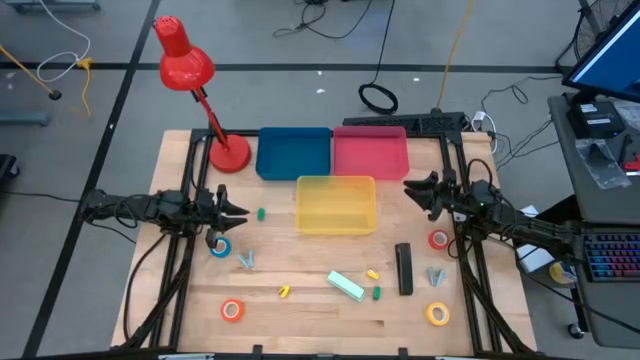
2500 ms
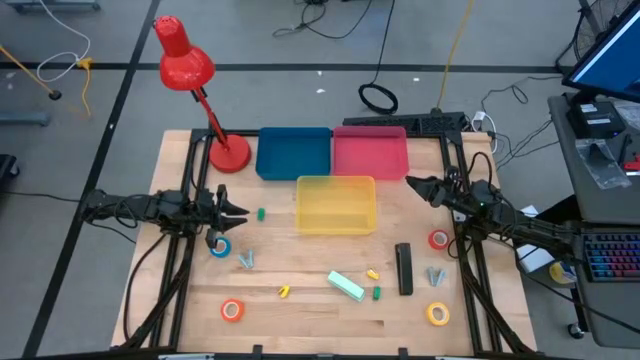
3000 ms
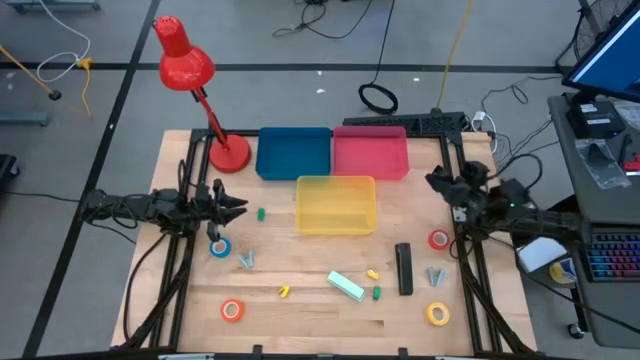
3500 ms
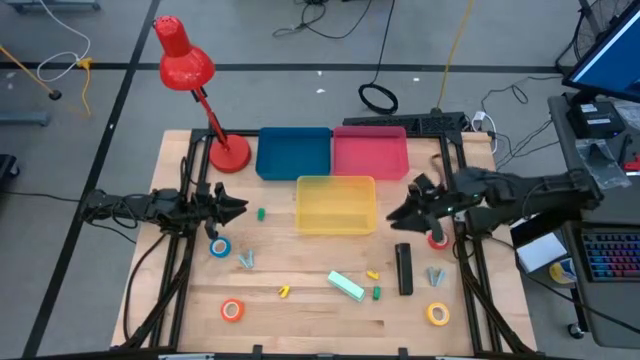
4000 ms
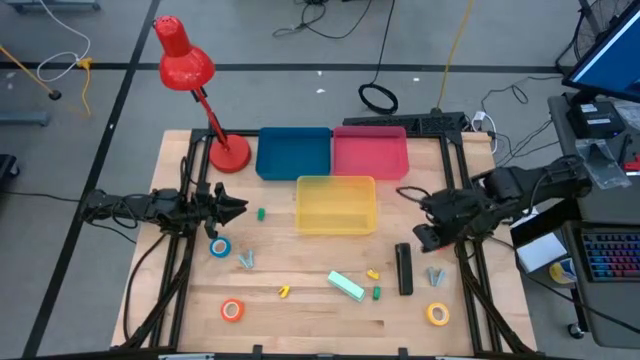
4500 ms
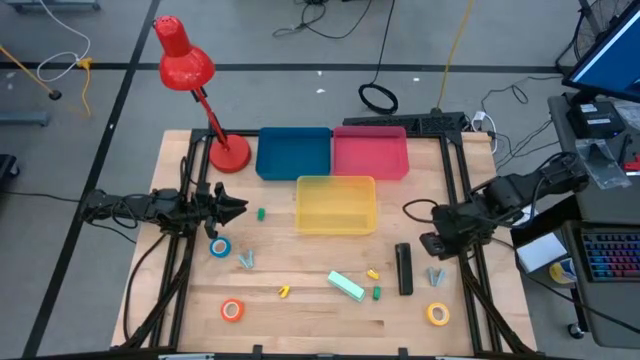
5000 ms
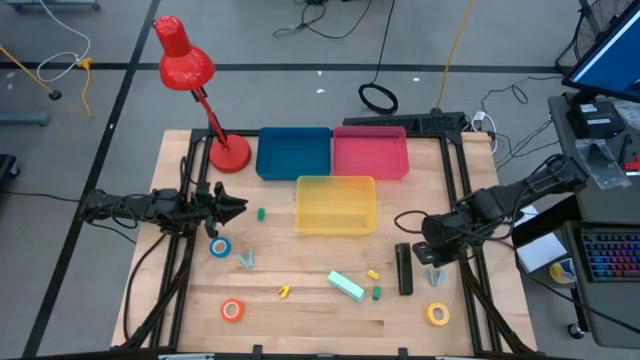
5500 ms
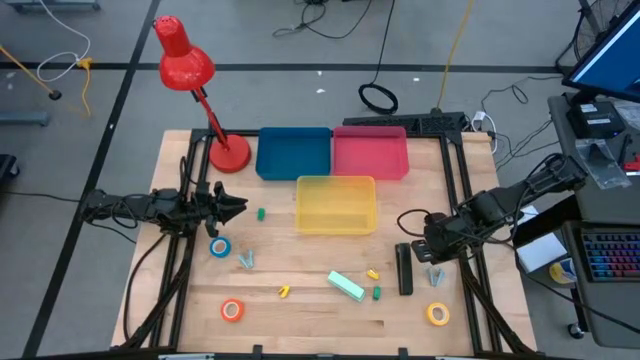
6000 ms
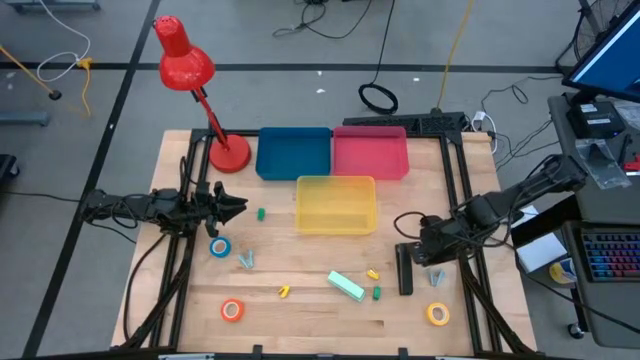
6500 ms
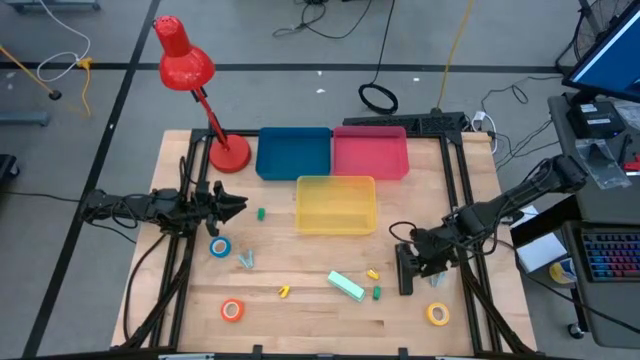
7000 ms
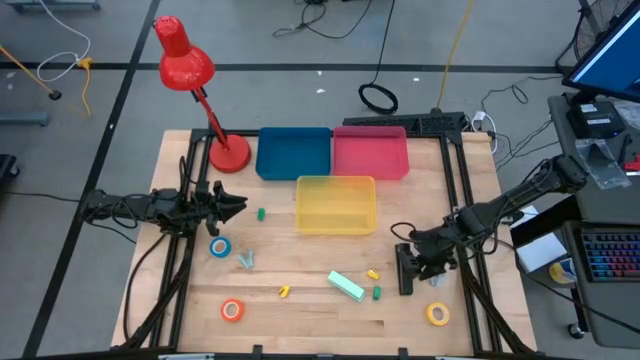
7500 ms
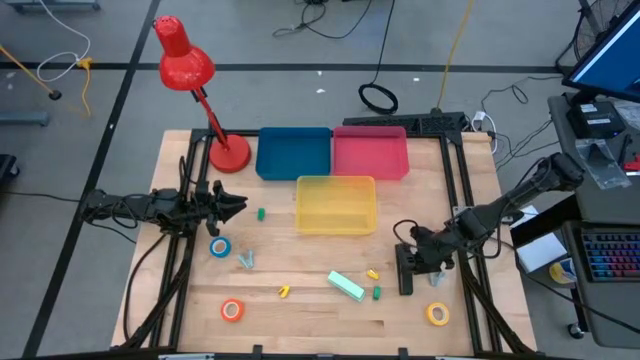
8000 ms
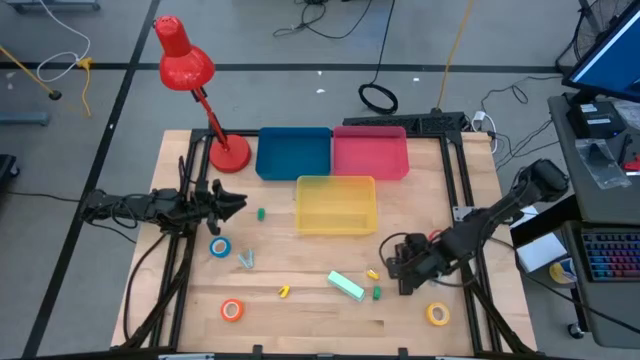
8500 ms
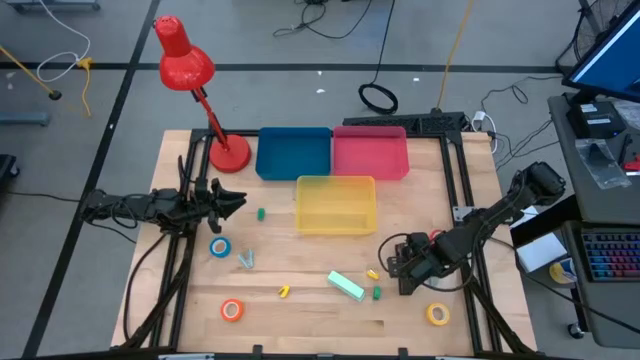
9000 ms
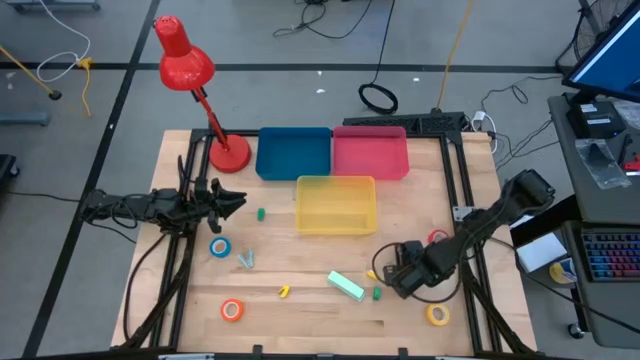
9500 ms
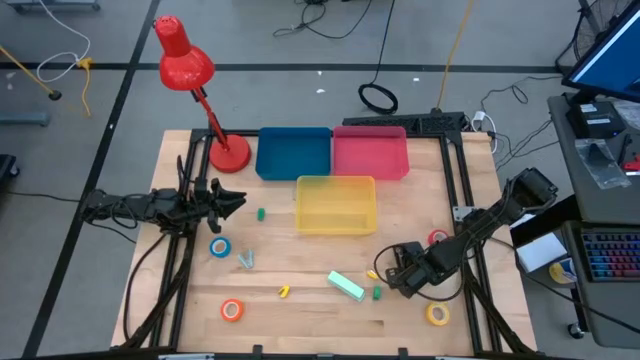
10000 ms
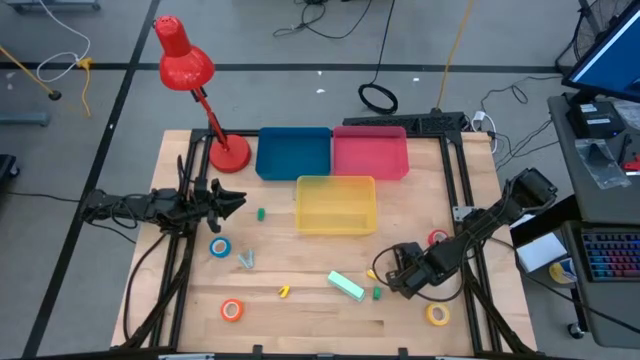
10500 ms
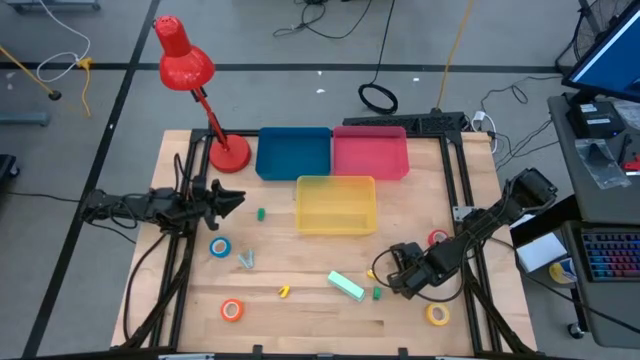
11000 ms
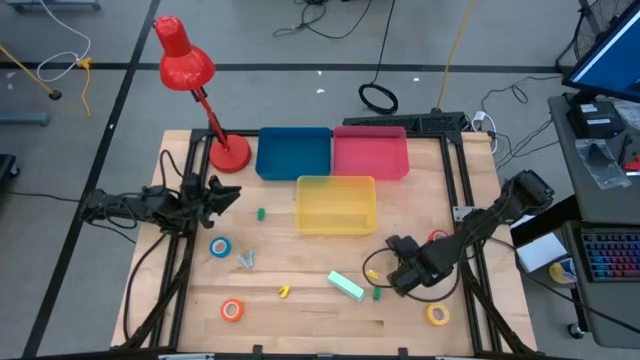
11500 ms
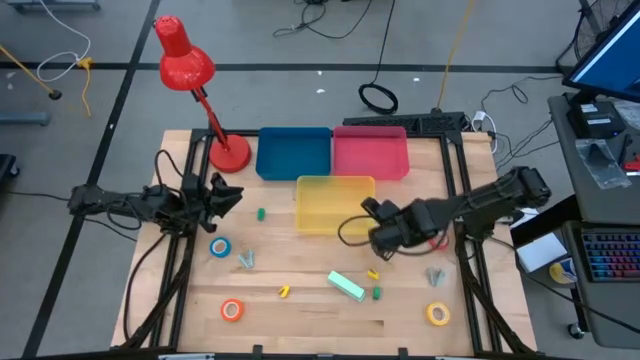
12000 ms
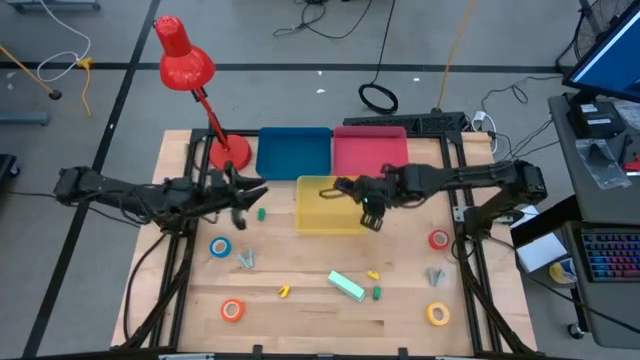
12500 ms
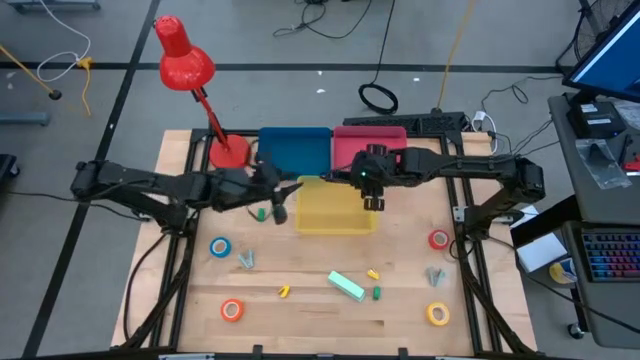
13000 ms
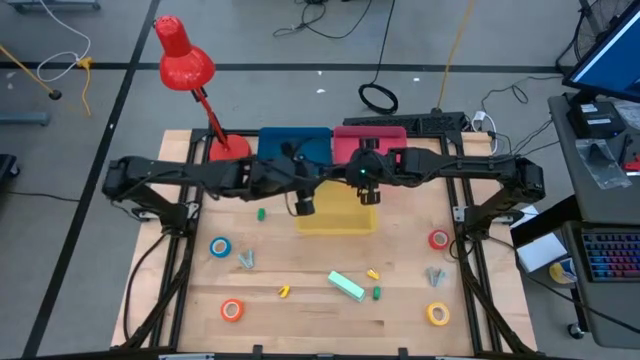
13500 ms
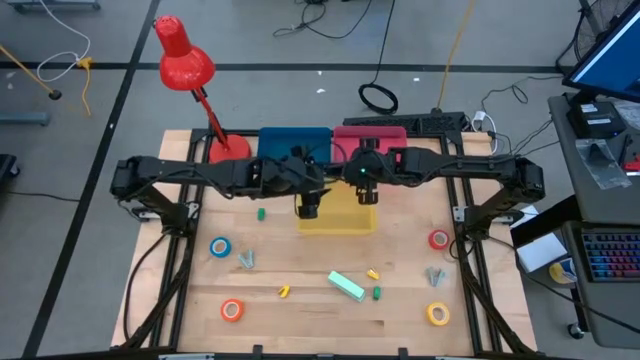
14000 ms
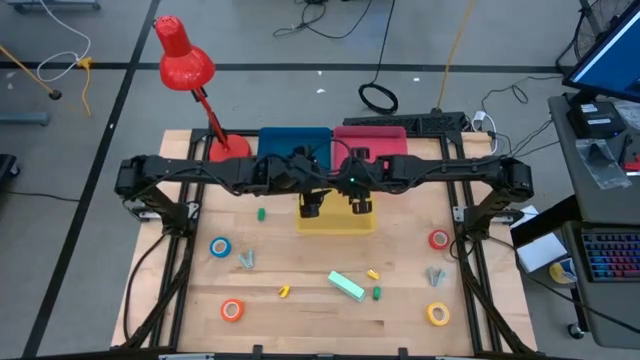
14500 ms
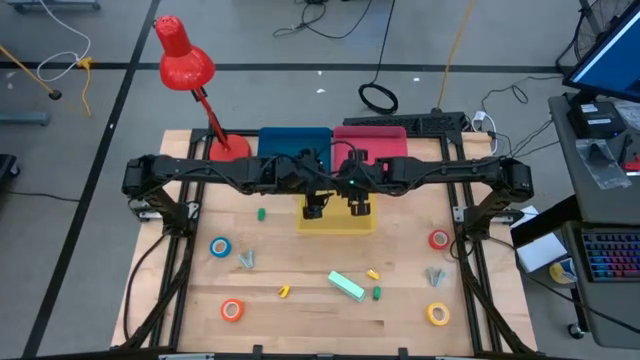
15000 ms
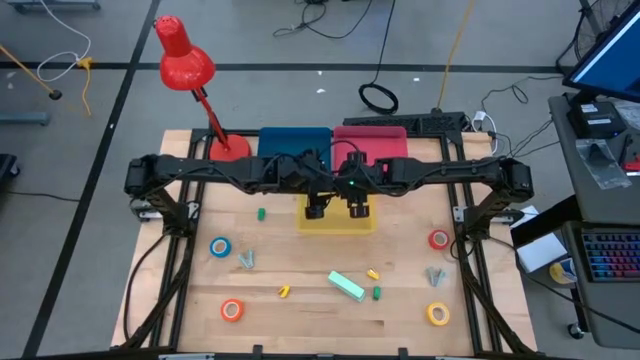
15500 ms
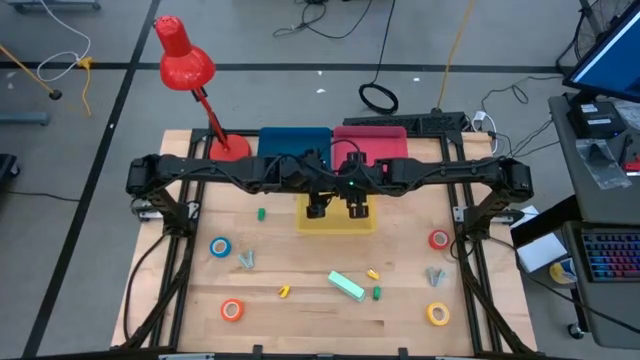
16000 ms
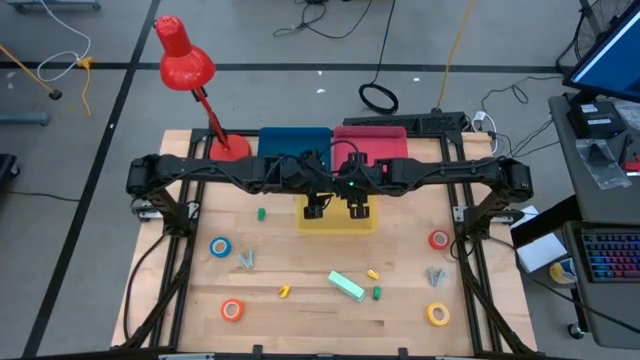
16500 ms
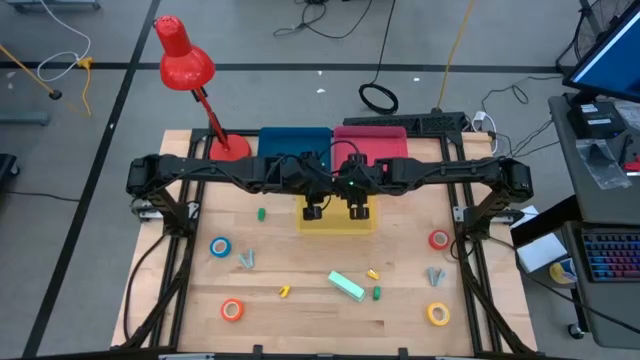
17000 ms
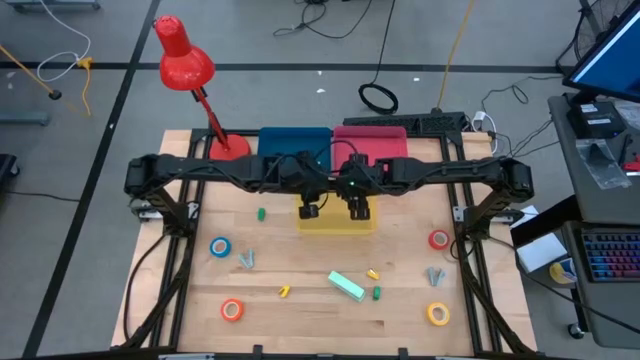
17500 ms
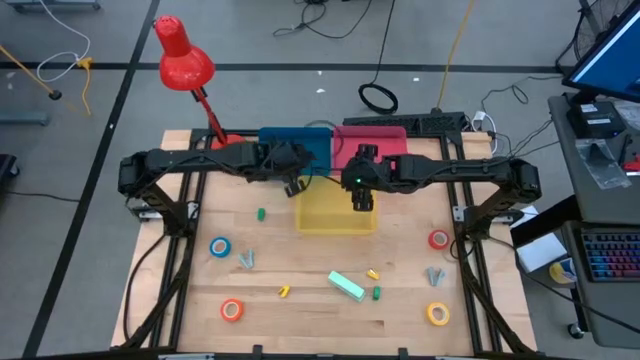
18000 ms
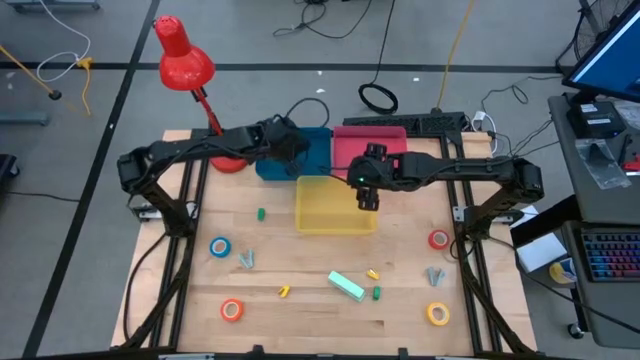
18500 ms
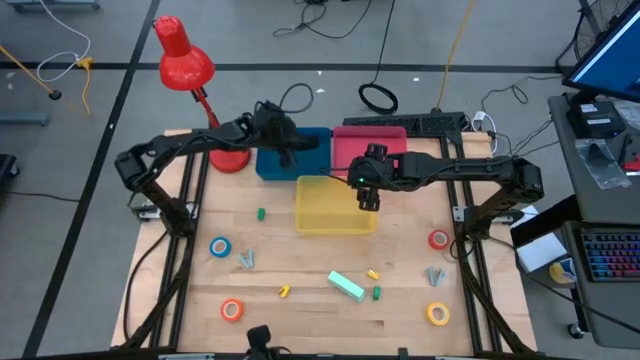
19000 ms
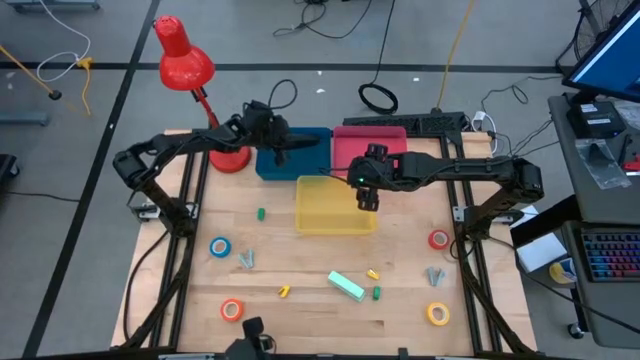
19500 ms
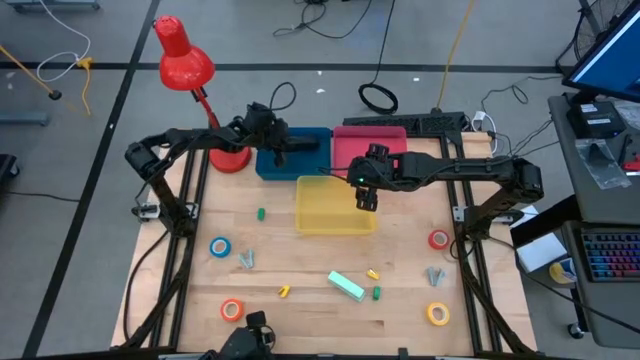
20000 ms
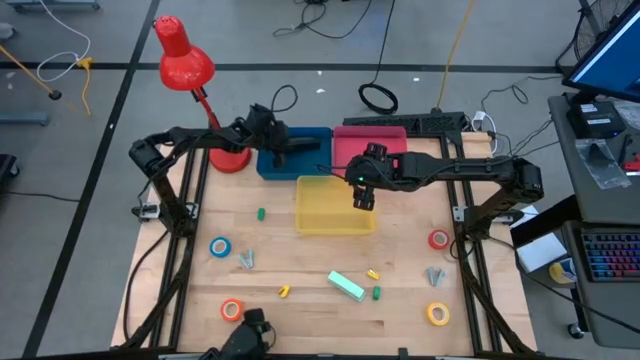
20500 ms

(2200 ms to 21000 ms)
Task: Pick and place Stapler, Stapler remover, tape
Put the black large stapler into the blue bin
